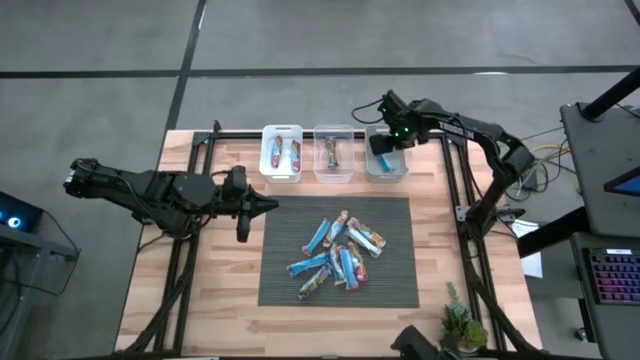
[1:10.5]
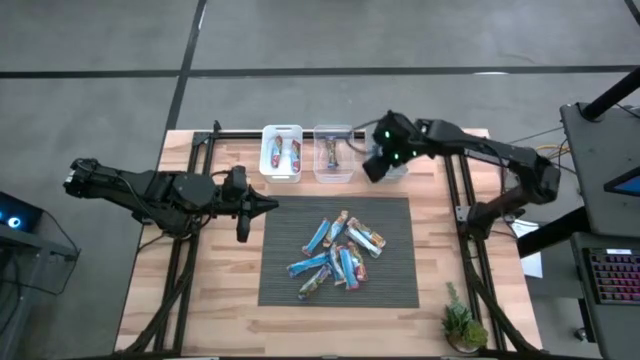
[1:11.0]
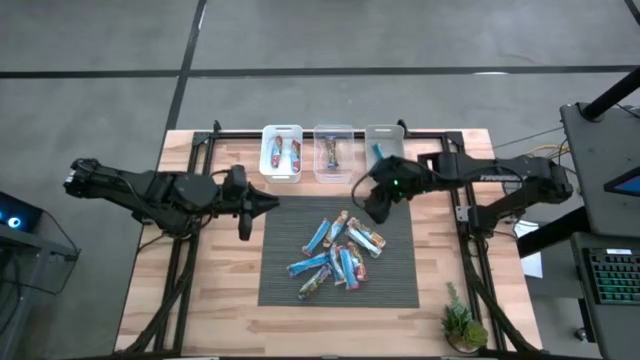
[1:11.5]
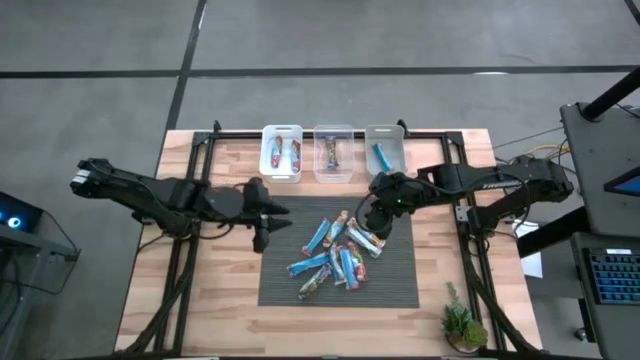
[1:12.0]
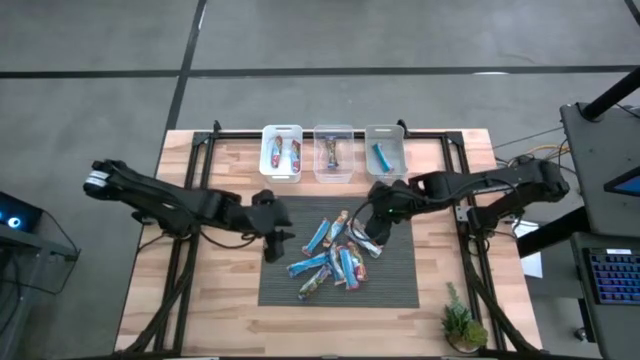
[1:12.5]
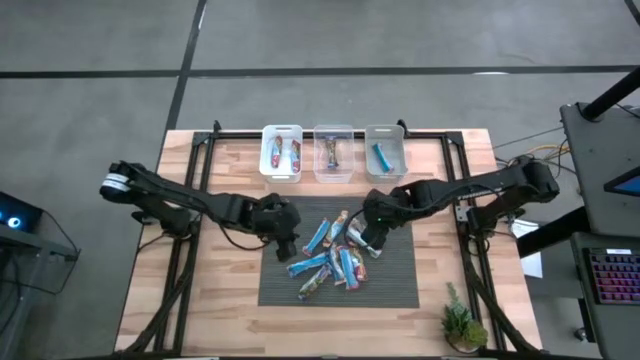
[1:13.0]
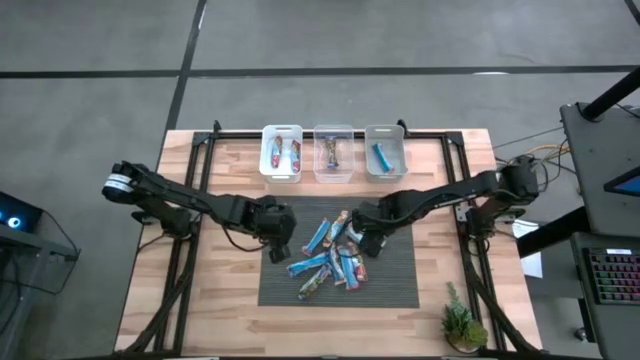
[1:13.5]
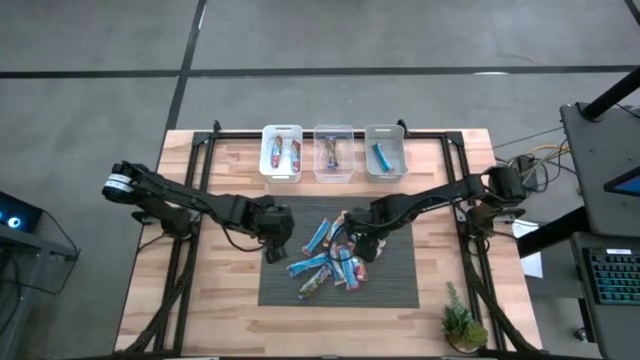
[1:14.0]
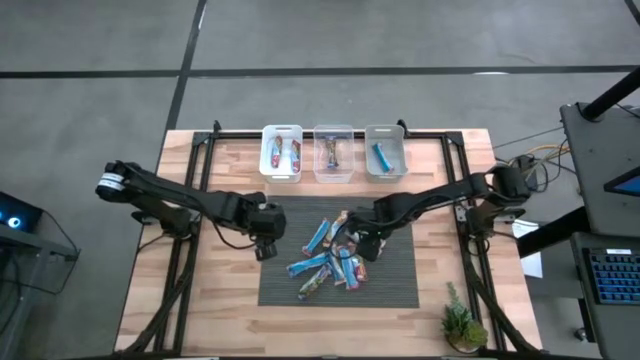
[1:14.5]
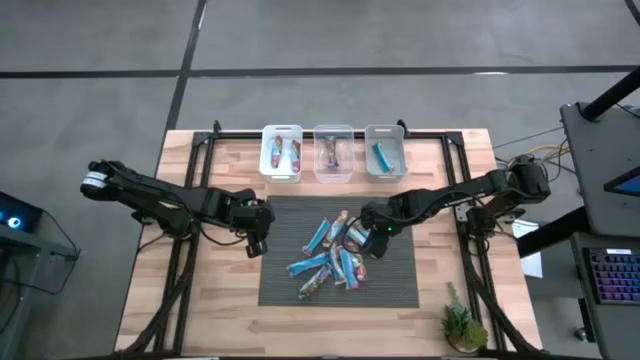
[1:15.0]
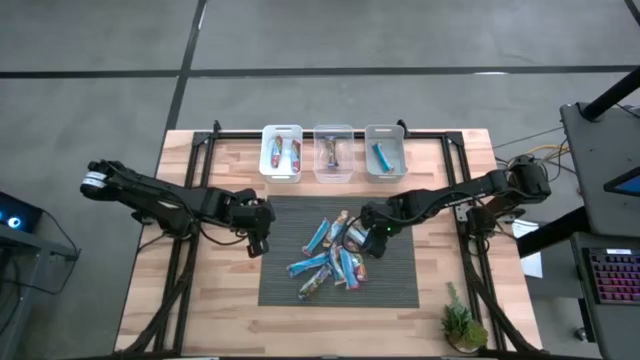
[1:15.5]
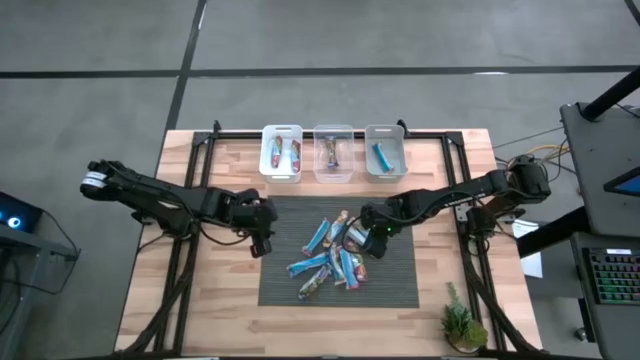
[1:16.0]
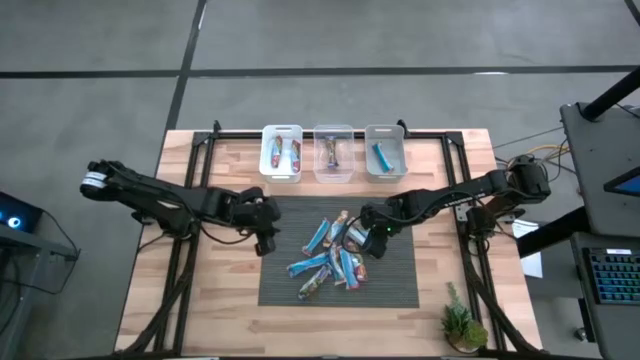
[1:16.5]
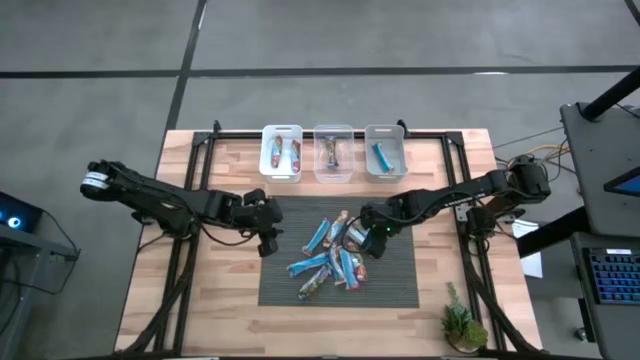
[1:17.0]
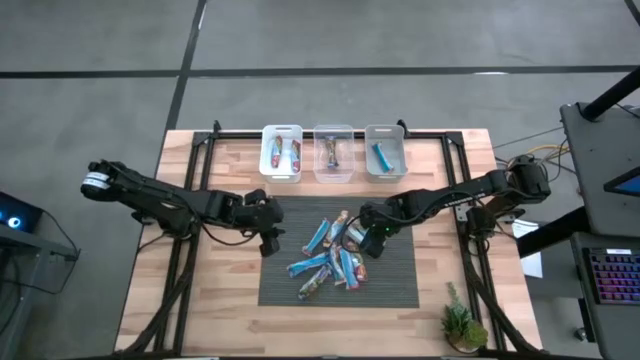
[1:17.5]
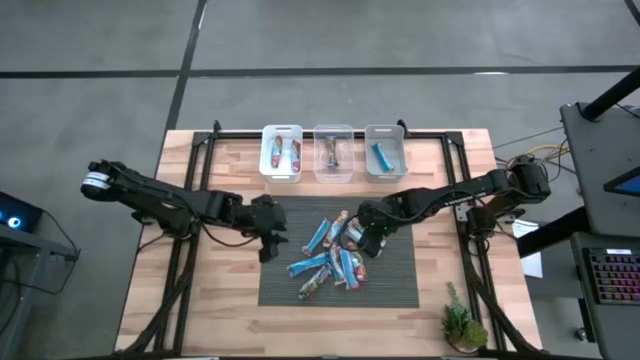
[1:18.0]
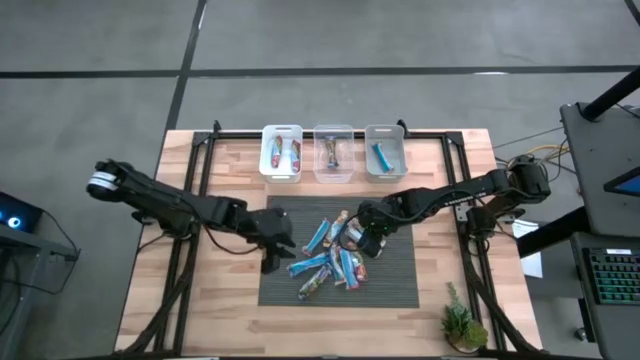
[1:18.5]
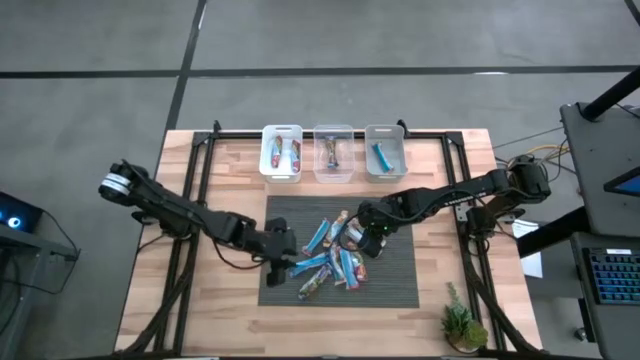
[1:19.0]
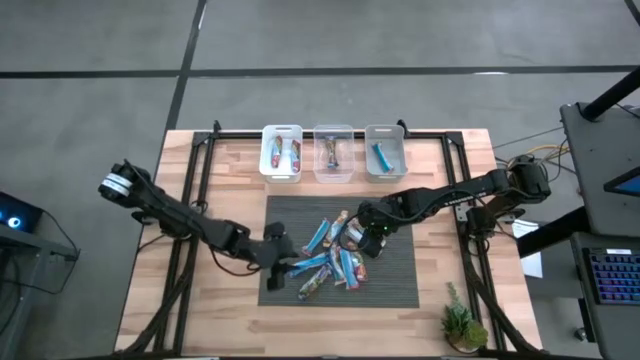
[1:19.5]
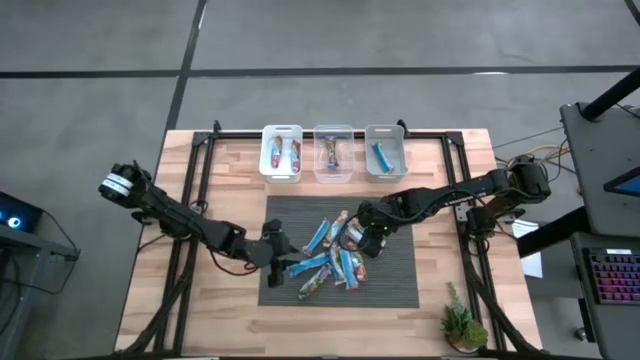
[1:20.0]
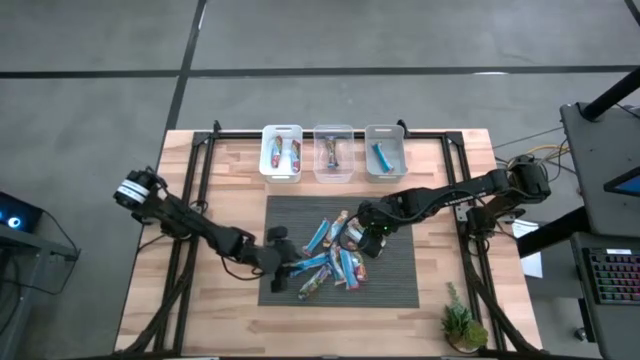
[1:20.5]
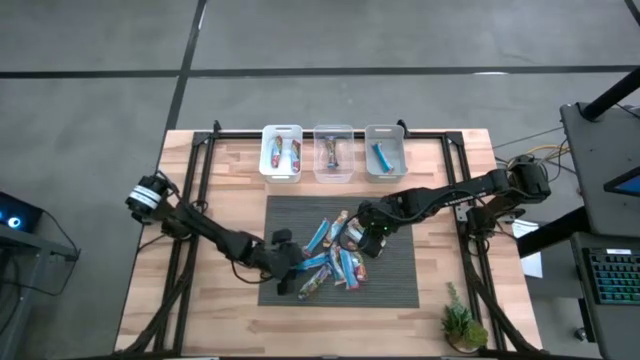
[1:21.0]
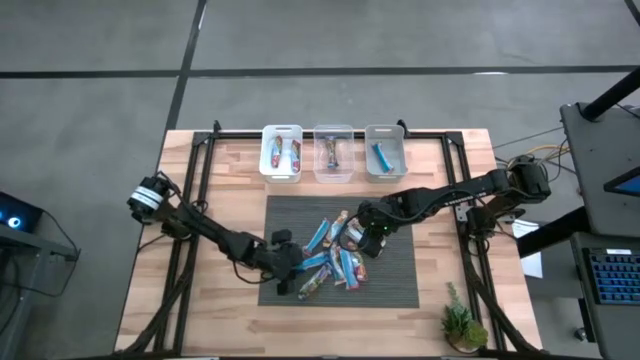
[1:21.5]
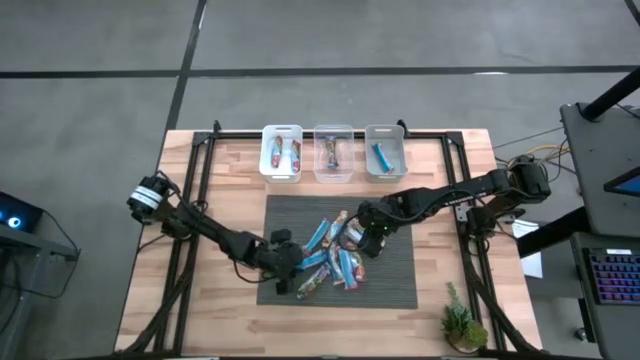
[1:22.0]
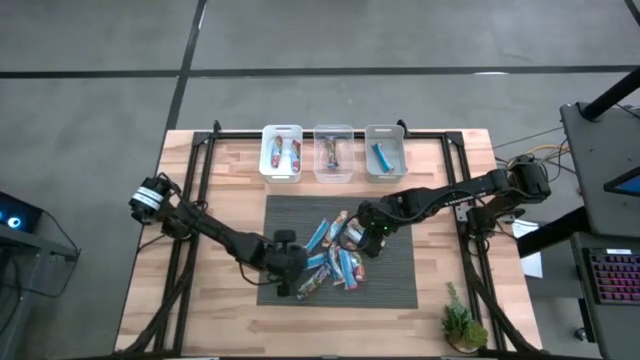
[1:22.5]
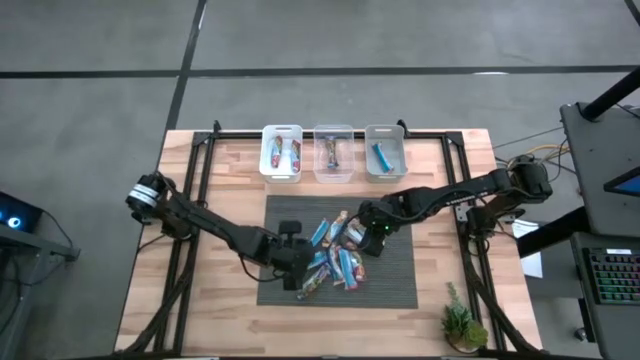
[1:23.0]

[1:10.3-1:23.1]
Task: Pick and place Granola Bars by type
Put the blue granola bar into the transparent bin

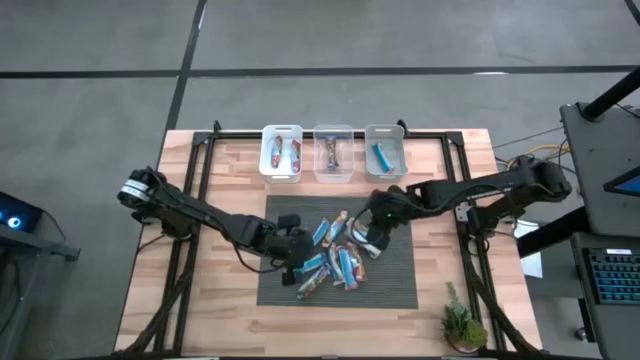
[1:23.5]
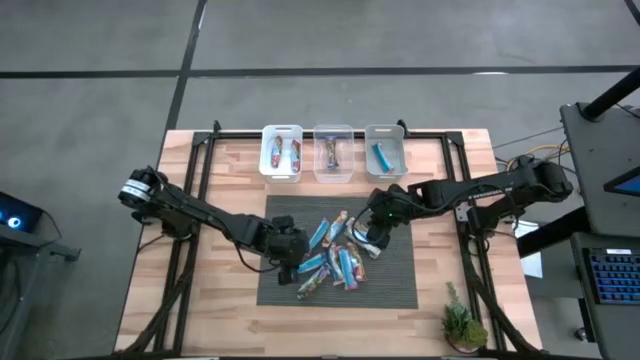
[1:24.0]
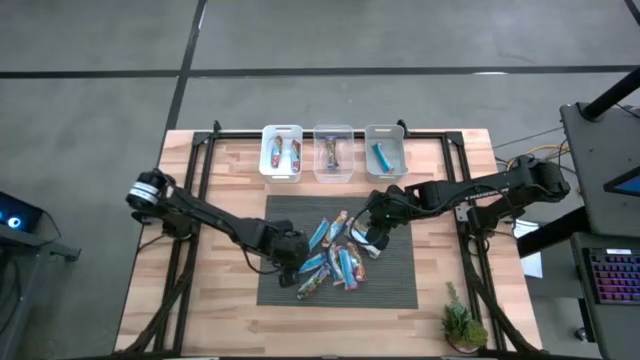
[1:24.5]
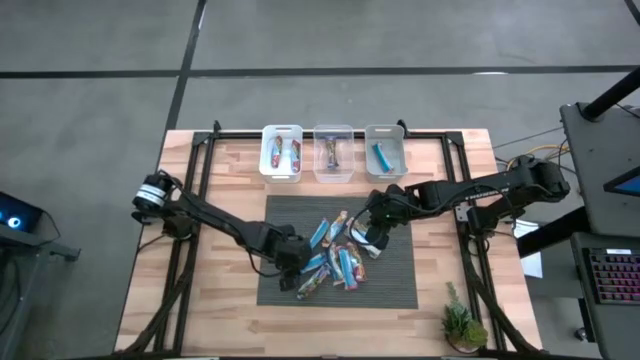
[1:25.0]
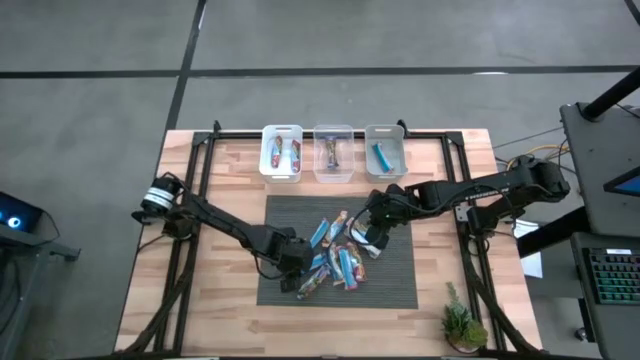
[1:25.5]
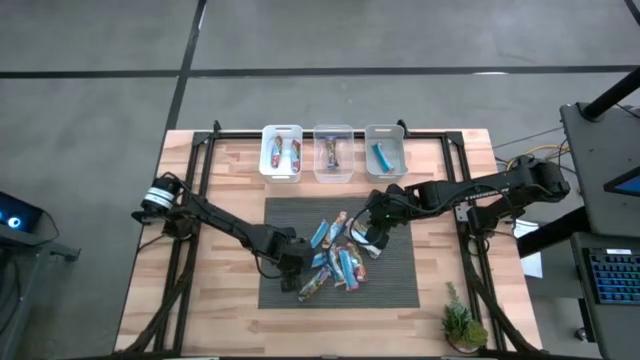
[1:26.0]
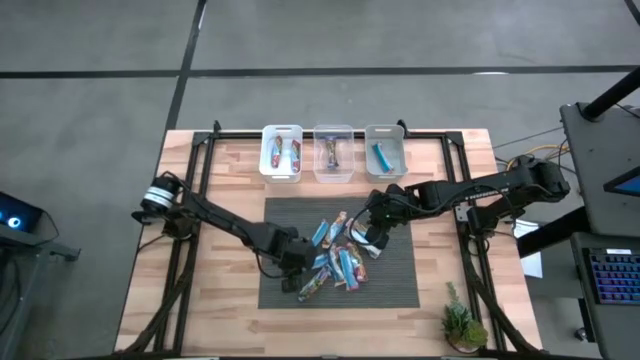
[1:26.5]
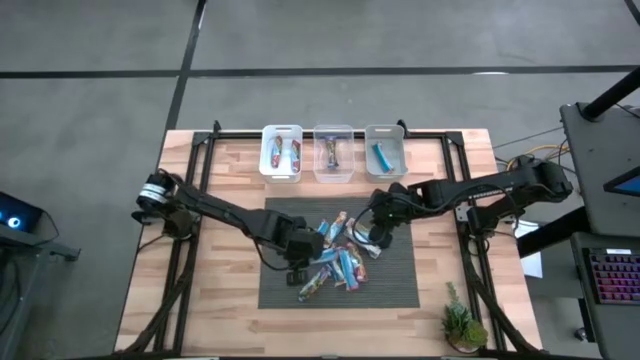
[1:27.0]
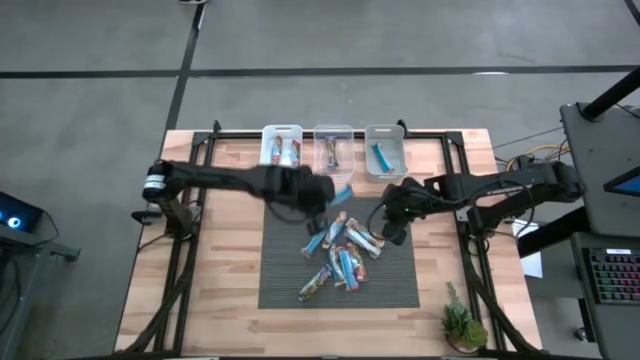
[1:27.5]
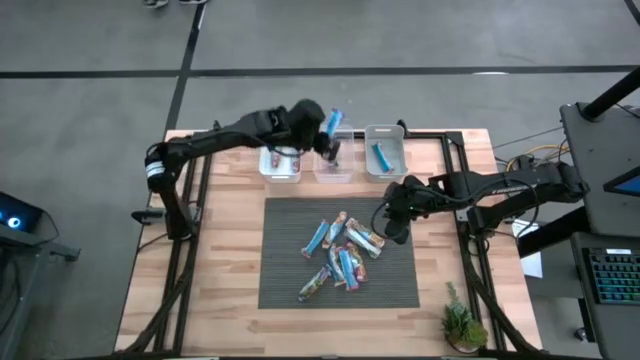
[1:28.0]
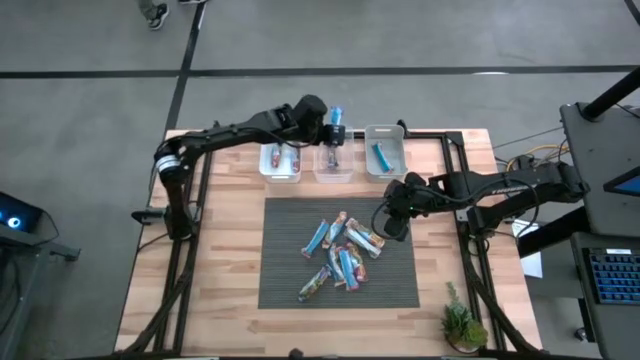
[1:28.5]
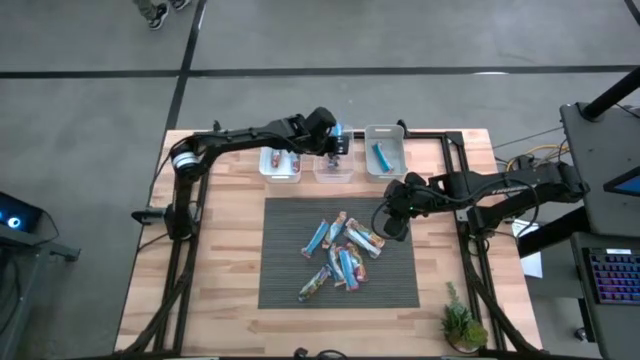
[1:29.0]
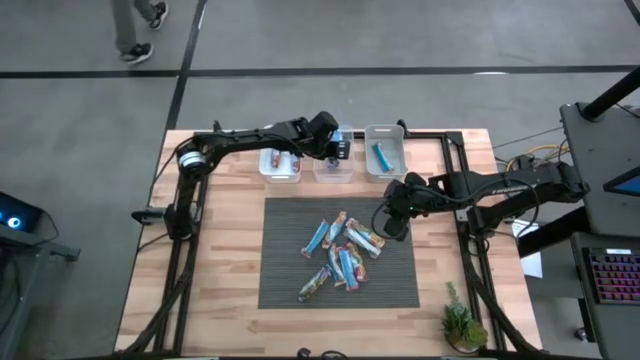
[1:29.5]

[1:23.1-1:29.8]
Put the blue granola bar into the transparent bin

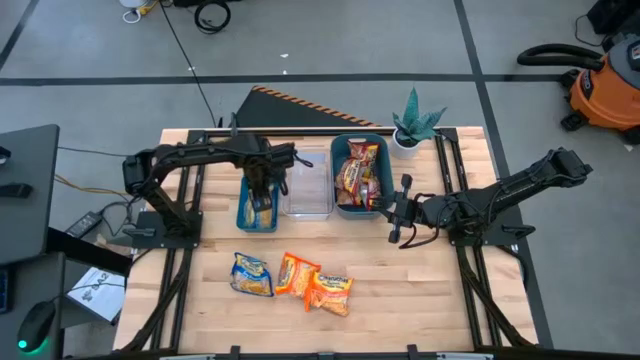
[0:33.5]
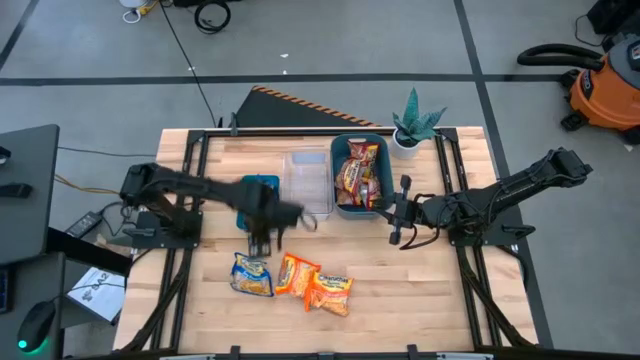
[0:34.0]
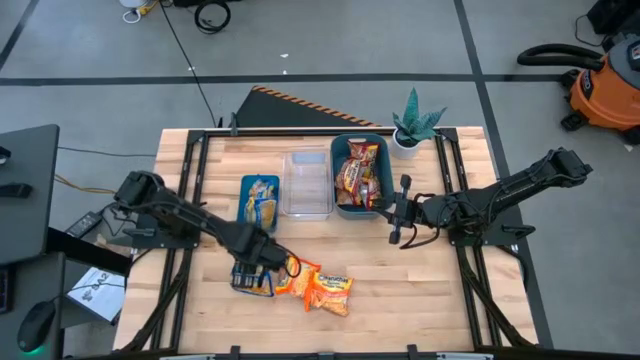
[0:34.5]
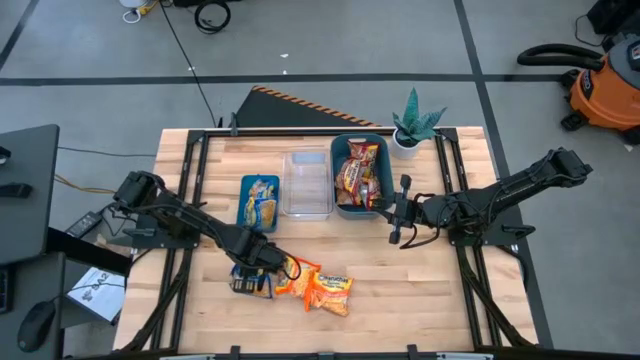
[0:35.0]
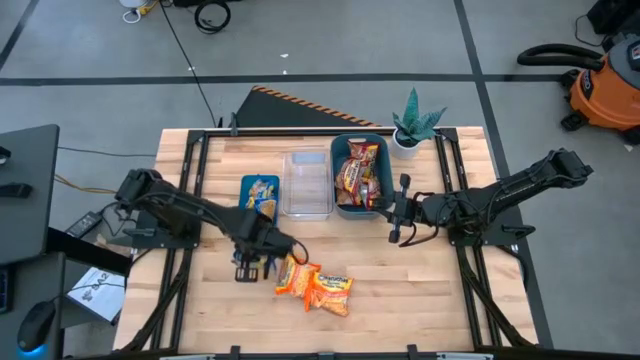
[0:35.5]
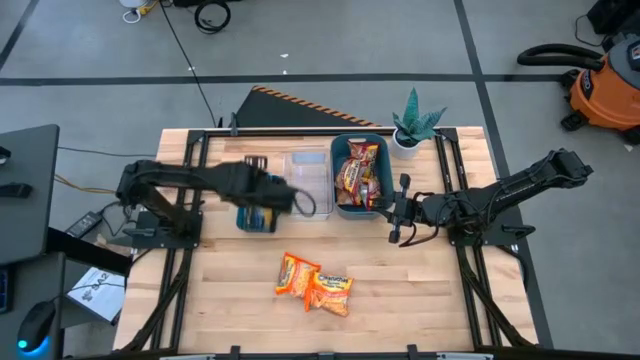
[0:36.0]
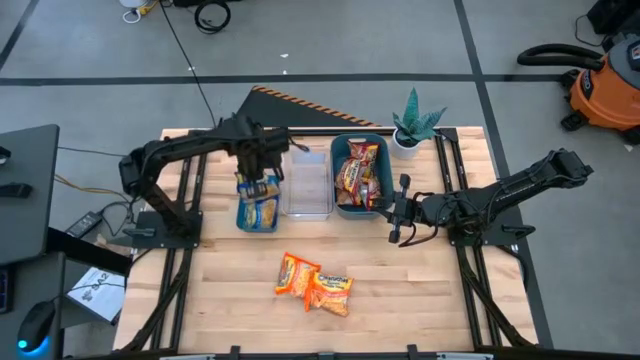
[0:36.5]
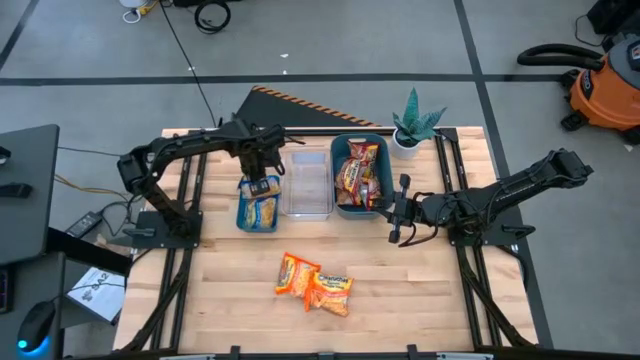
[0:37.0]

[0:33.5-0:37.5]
Task: Sort Maruchan noodles
Put the blue noodle pack into the blue bin
